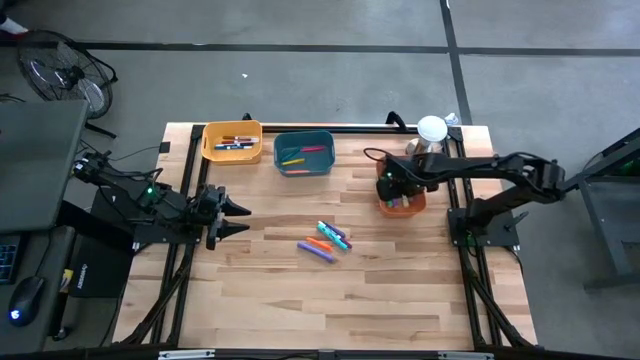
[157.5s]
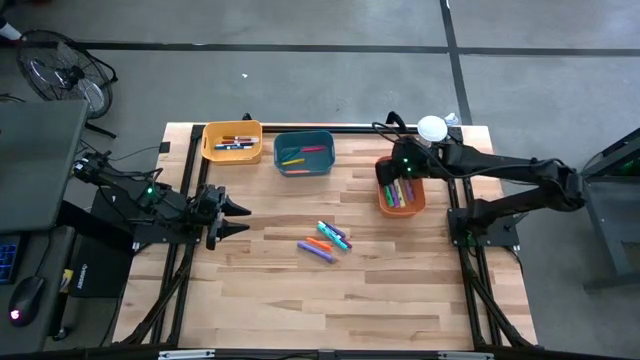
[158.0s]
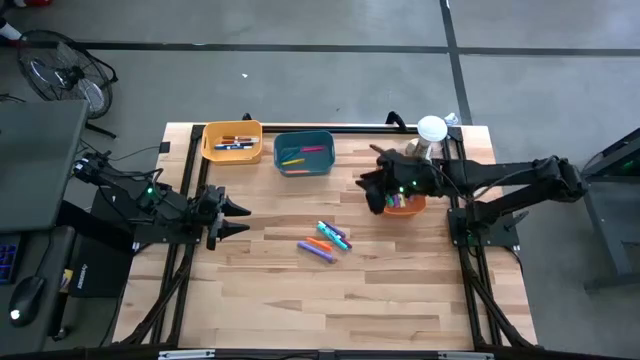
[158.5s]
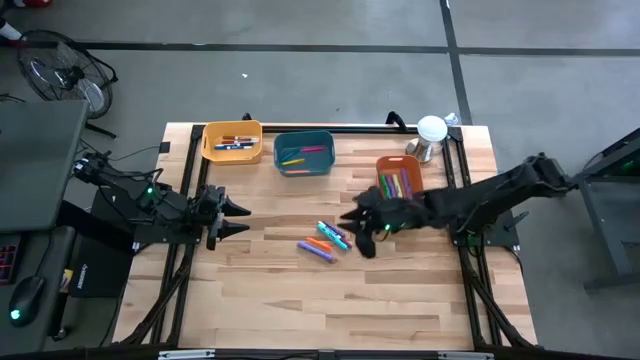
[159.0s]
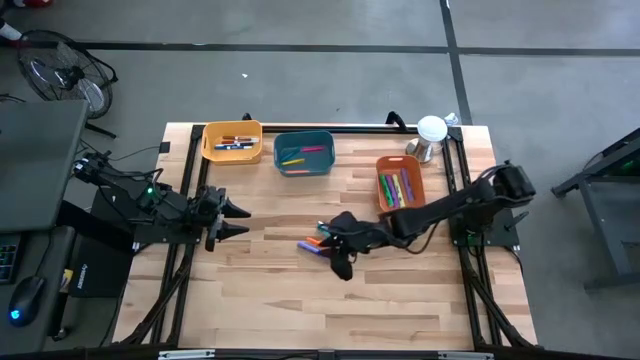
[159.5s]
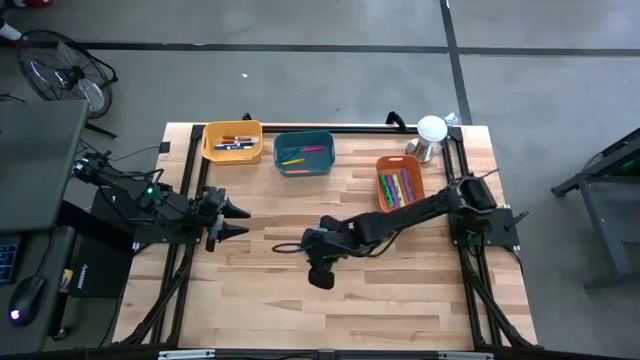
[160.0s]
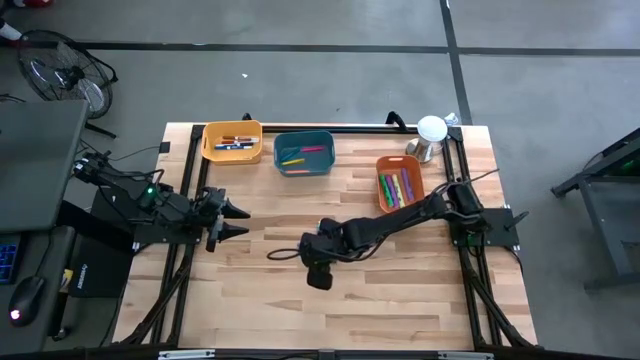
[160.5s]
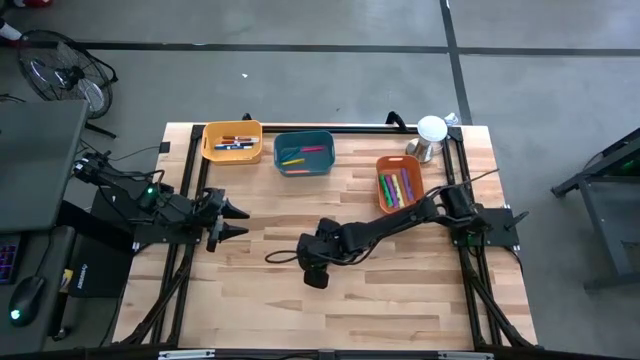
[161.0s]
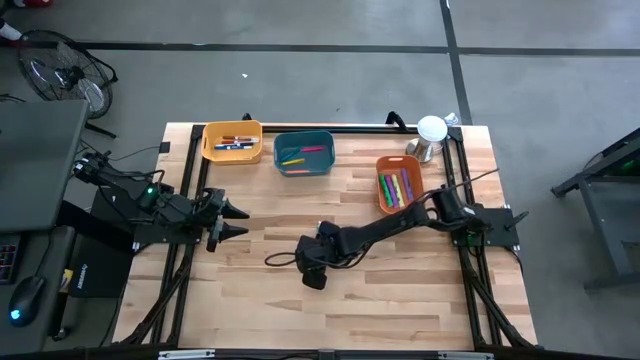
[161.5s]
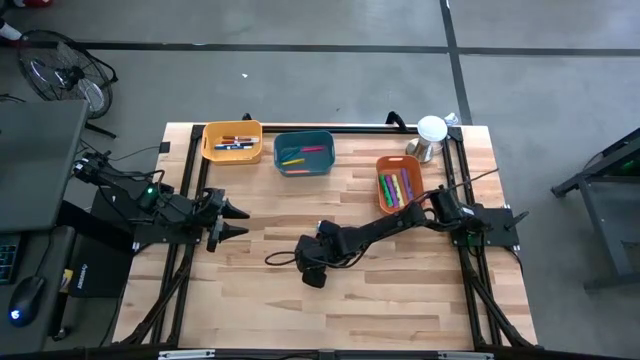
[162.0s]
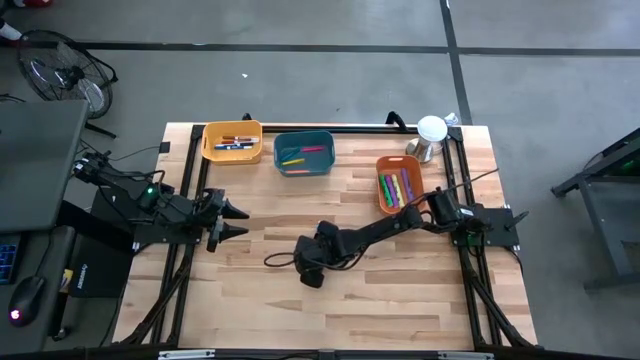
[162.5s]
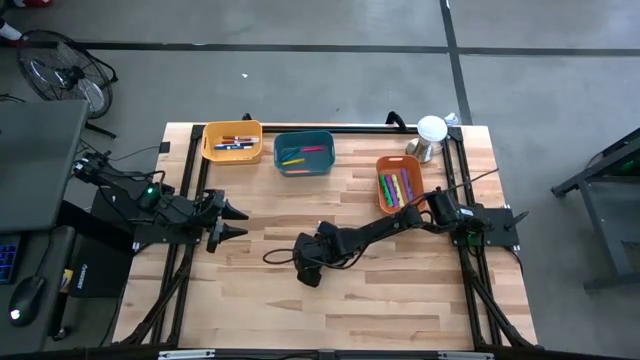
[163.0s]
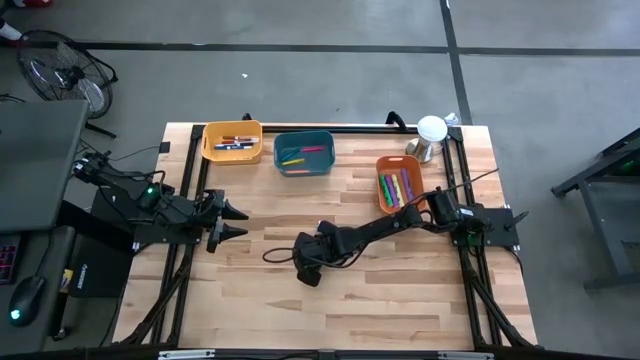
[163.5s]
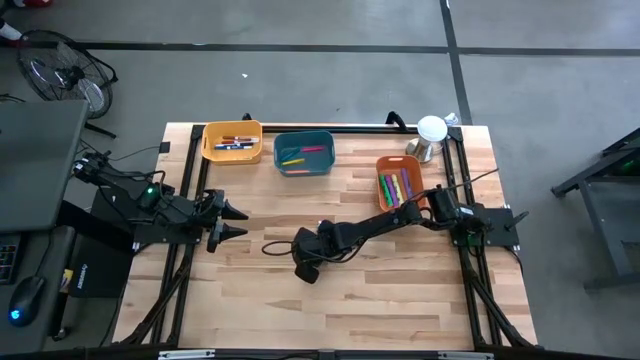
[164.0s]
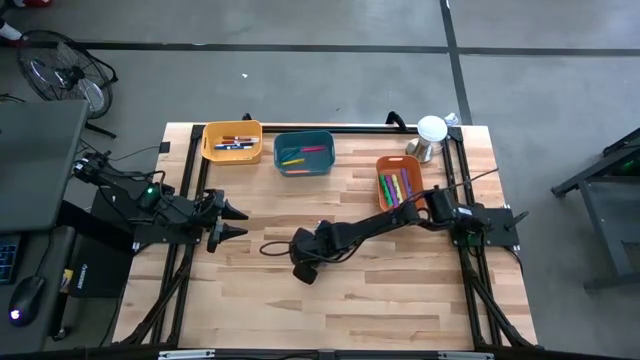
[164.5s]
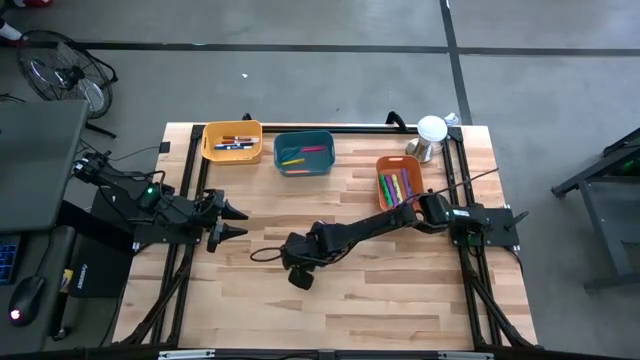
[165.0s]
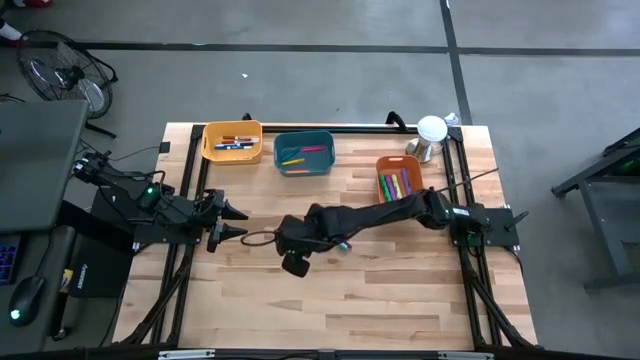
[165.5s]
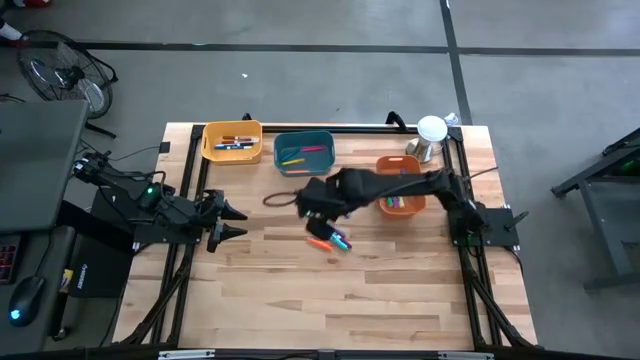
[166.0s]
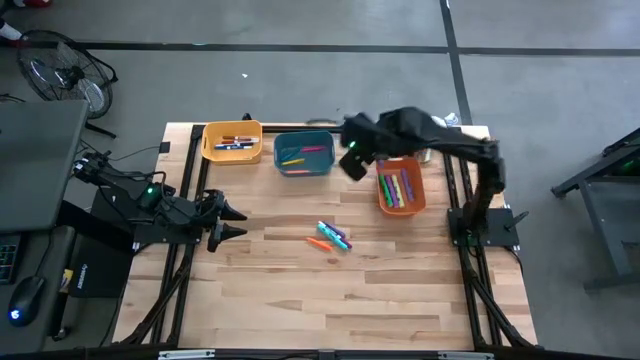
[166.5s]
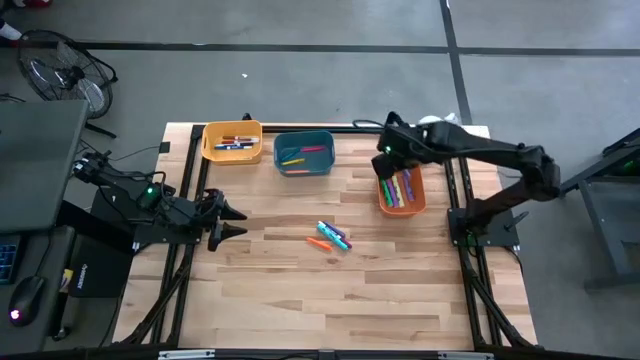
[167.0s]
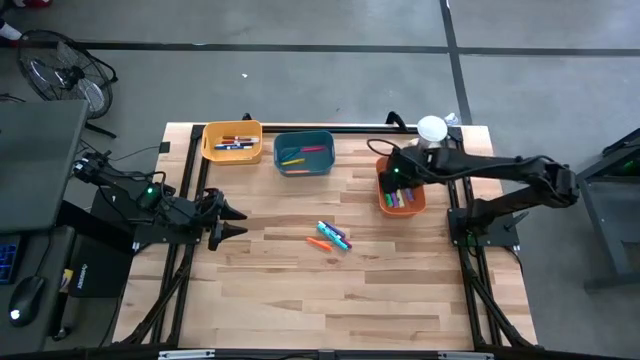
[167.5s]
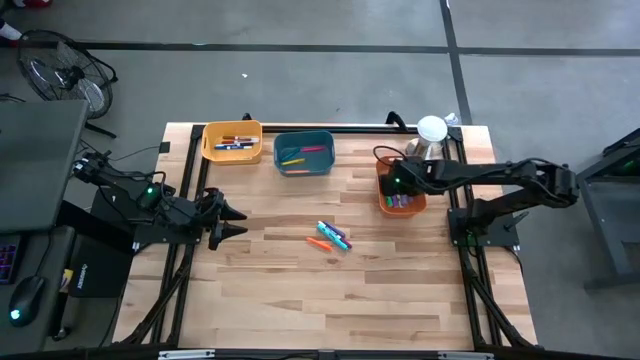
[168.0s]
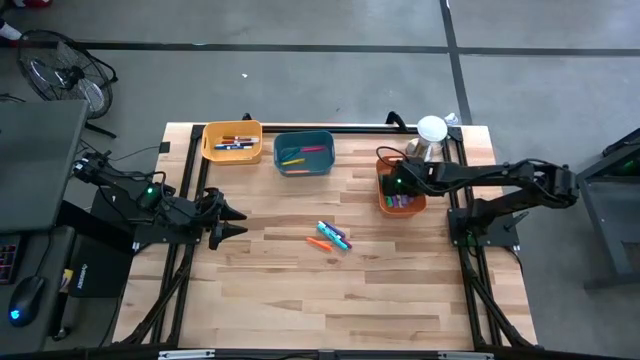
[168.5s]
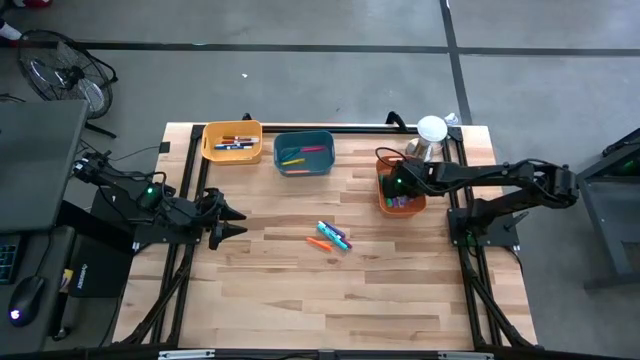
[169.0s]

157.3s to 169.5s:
Task: Pick & Place Markers
Put the light purple highlighter pen into the orange bin

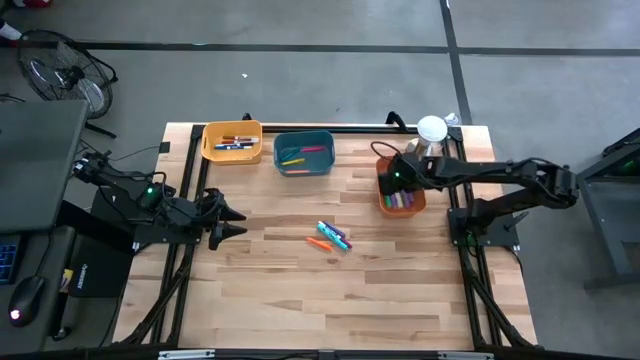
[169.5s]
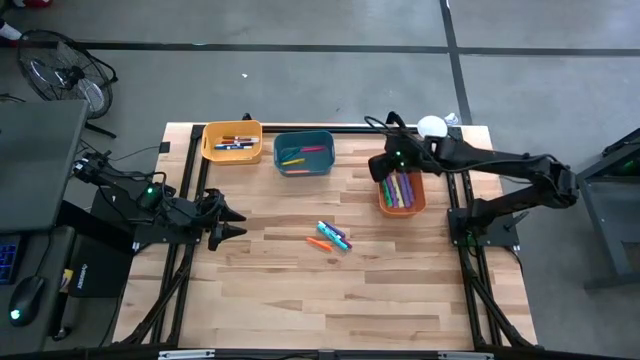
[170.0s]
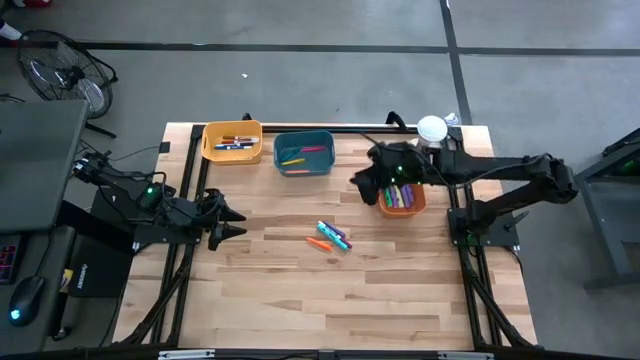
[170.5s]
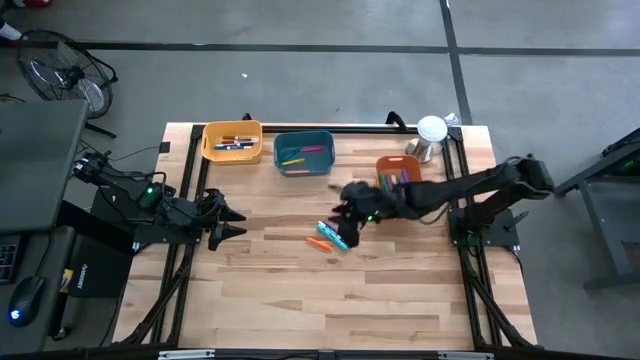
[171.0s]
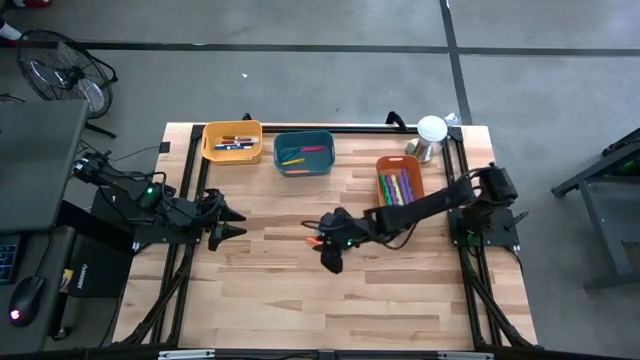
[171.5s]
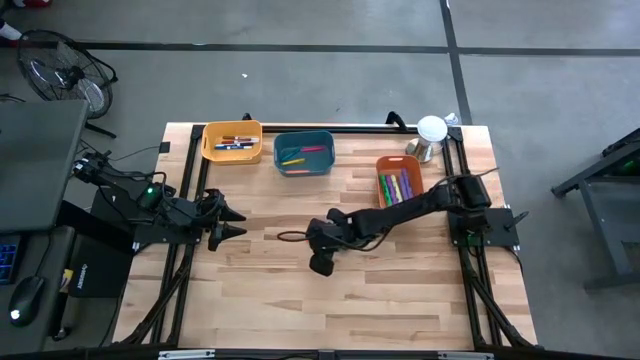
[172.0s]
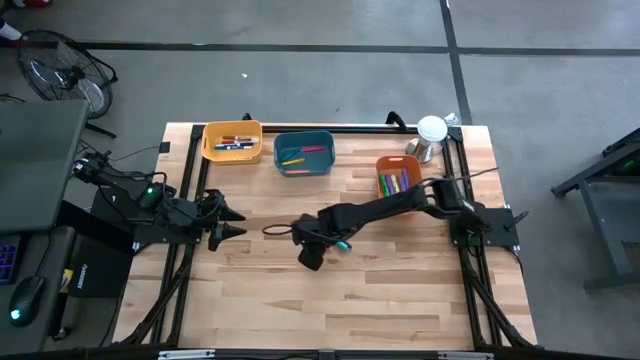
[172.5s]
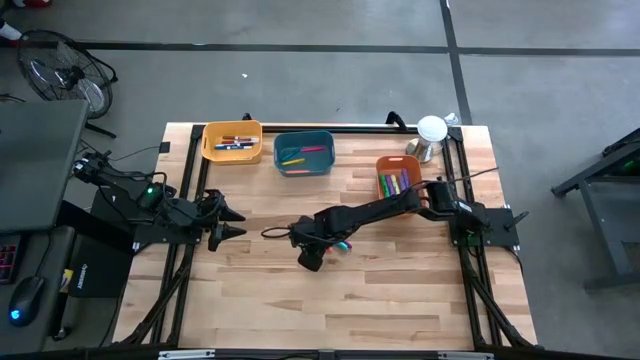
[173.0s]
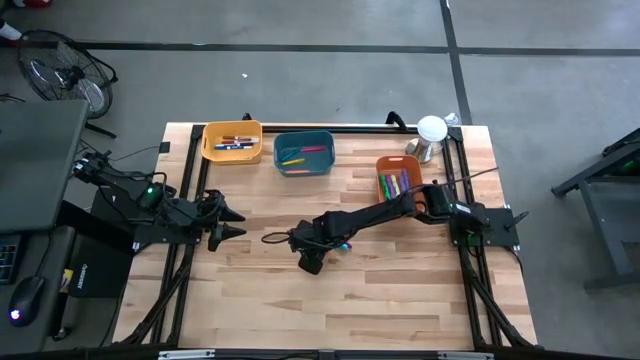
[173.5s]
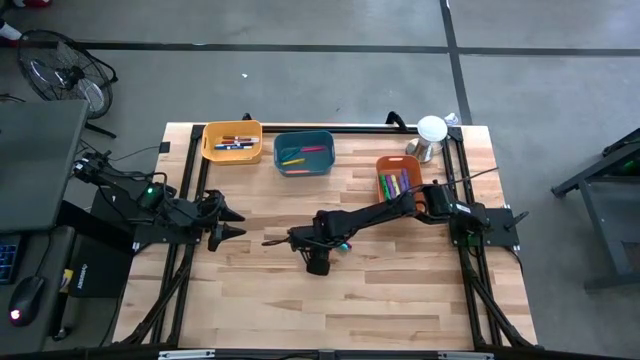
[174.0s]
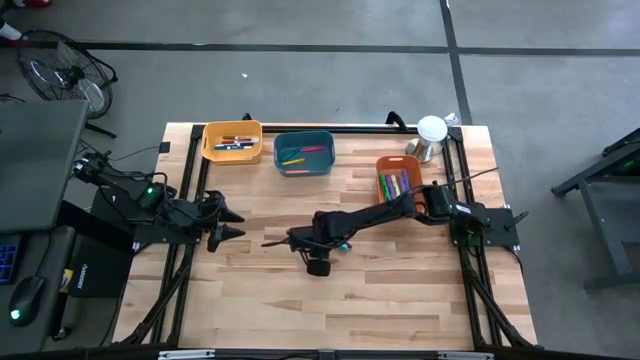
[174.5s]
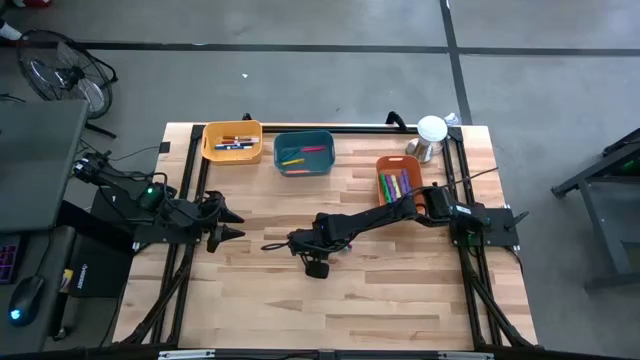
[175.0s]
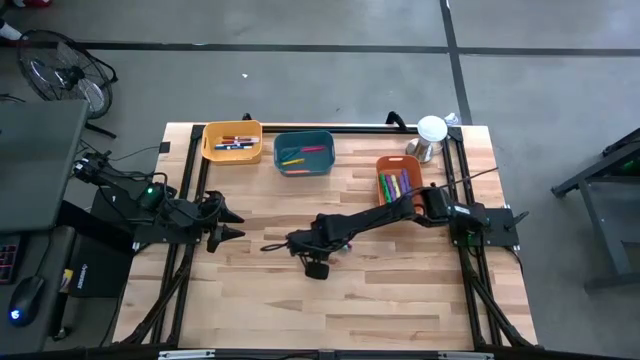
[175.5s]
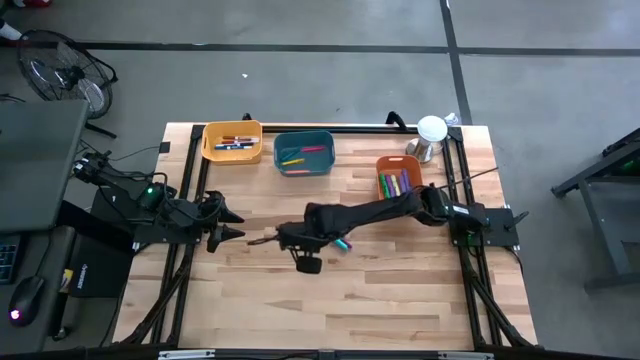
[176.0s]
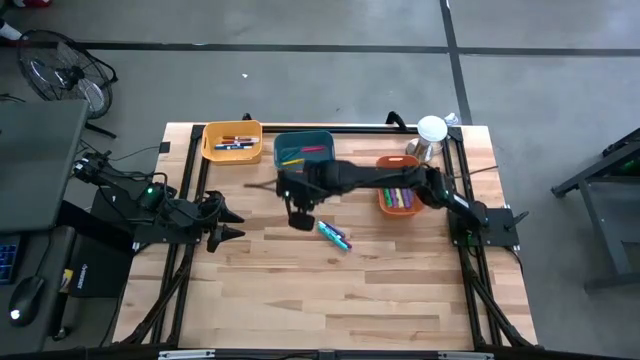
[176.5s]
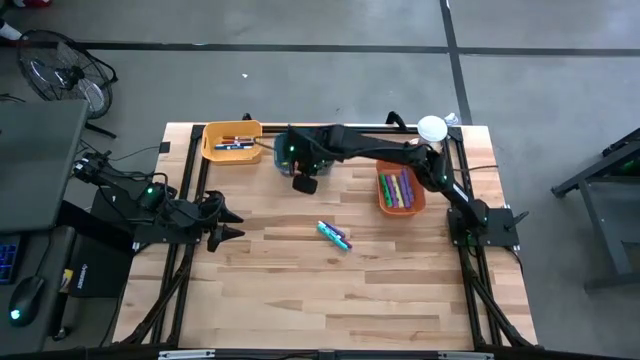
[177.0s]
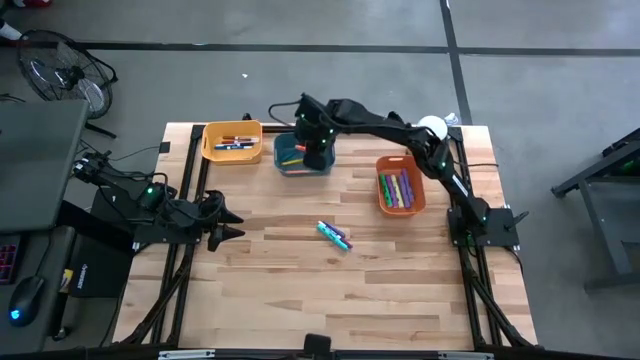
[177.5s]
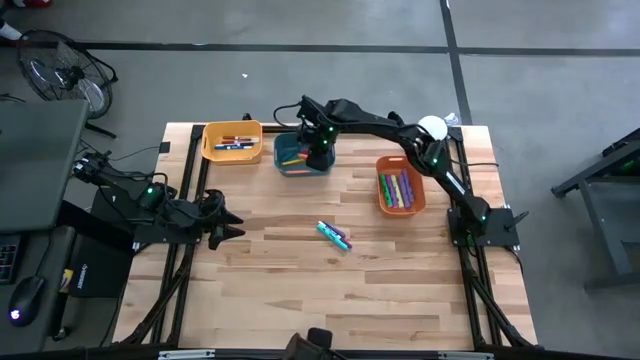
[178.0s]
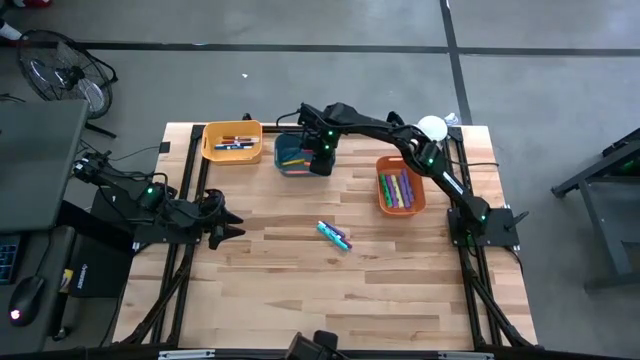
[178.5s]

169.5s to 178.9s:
Put the orange pen into the blue bin
